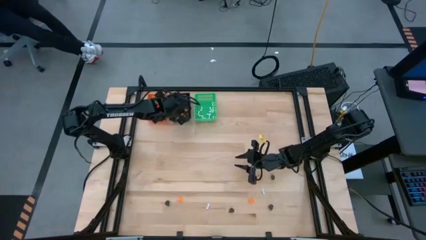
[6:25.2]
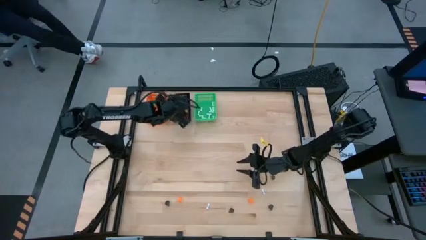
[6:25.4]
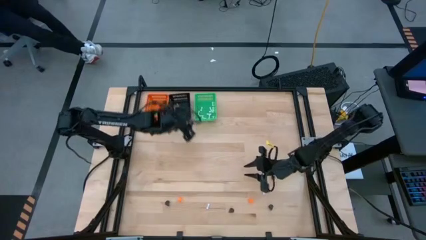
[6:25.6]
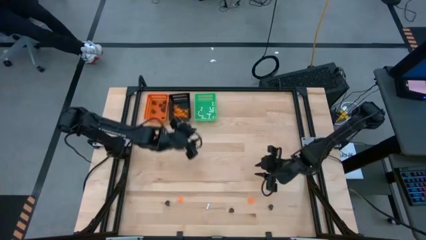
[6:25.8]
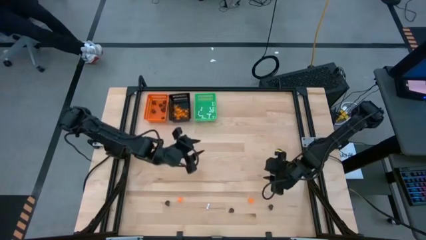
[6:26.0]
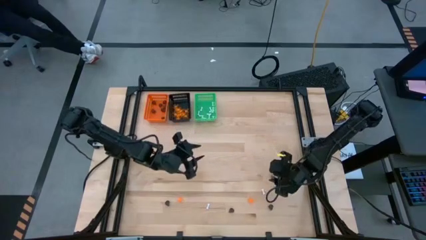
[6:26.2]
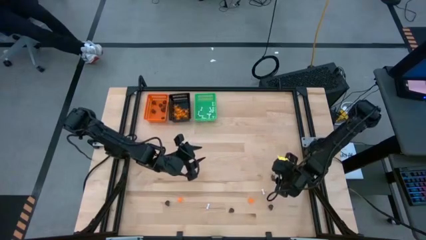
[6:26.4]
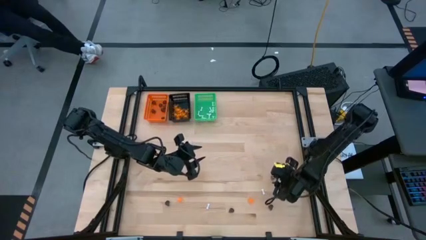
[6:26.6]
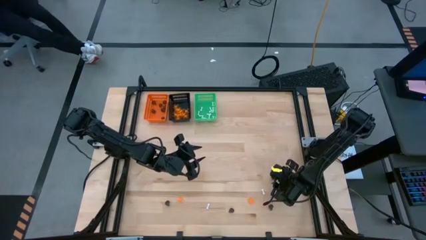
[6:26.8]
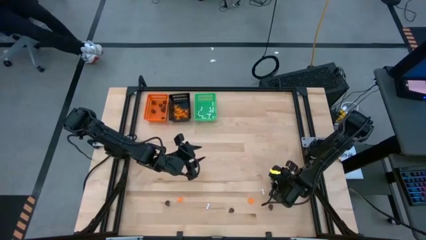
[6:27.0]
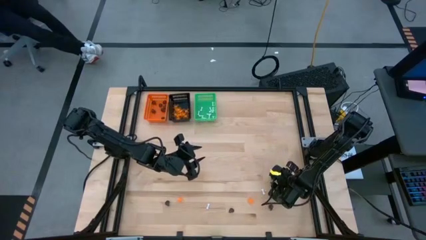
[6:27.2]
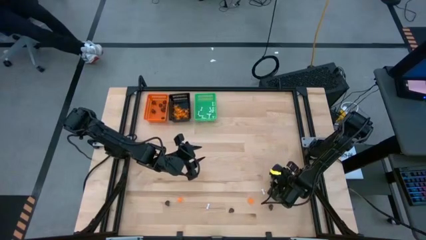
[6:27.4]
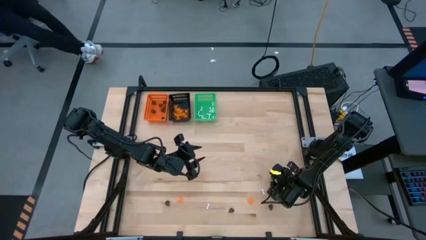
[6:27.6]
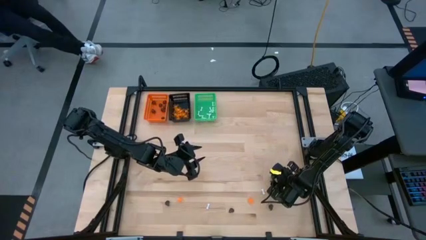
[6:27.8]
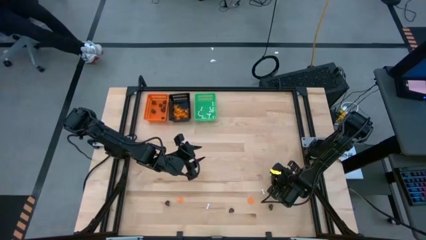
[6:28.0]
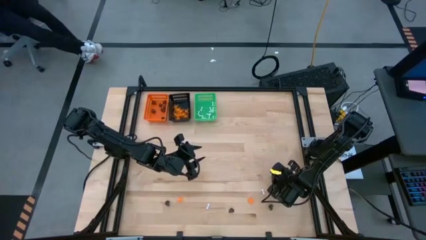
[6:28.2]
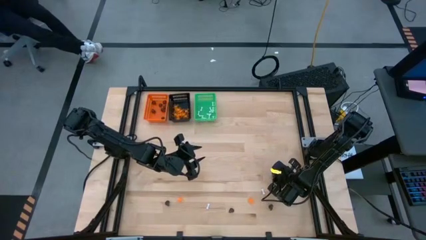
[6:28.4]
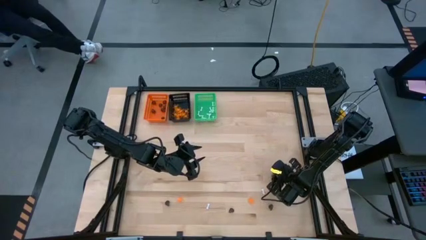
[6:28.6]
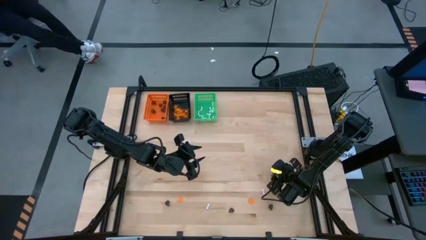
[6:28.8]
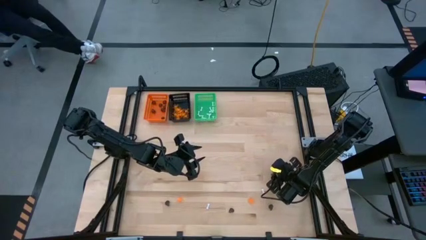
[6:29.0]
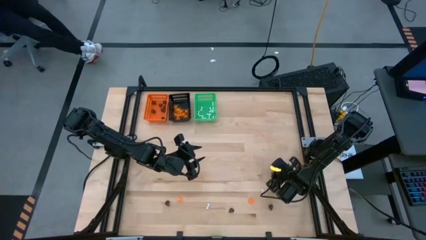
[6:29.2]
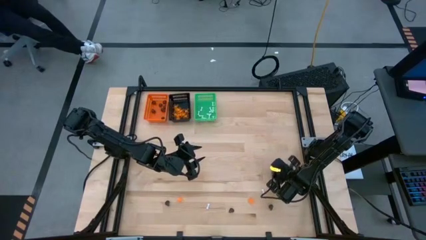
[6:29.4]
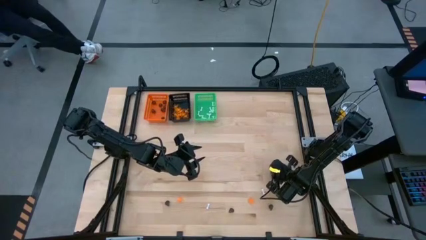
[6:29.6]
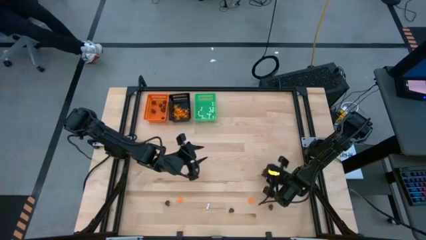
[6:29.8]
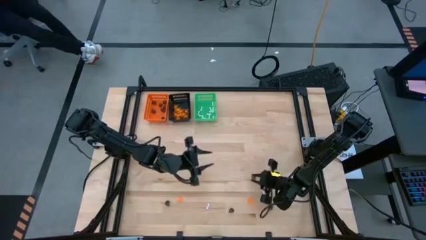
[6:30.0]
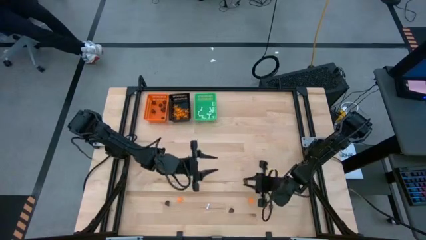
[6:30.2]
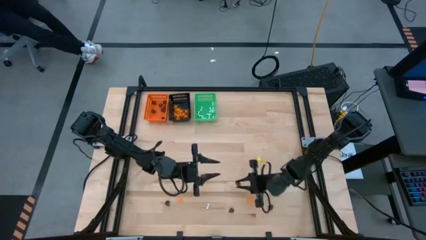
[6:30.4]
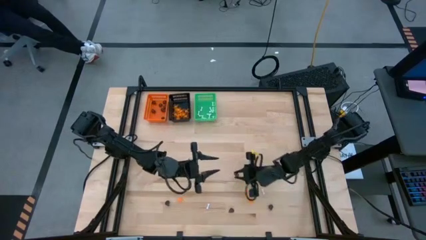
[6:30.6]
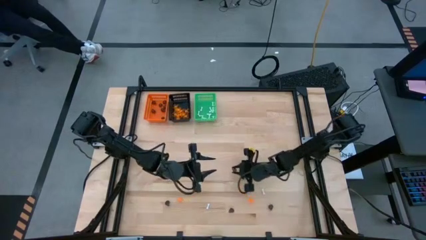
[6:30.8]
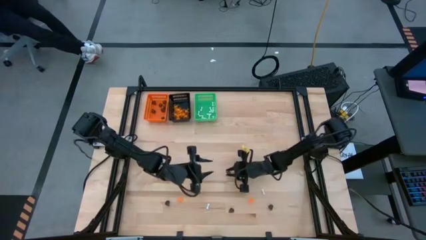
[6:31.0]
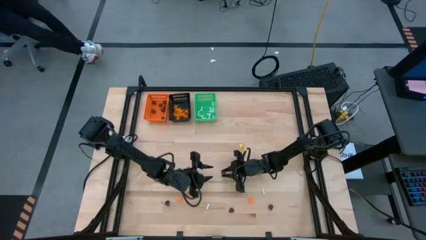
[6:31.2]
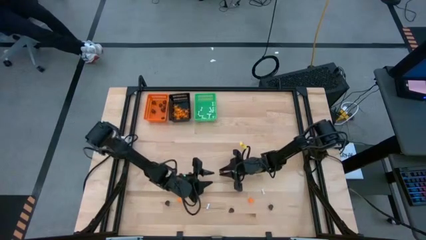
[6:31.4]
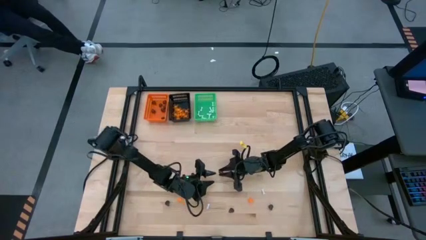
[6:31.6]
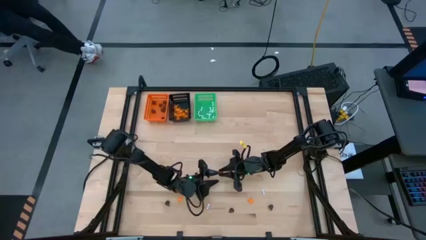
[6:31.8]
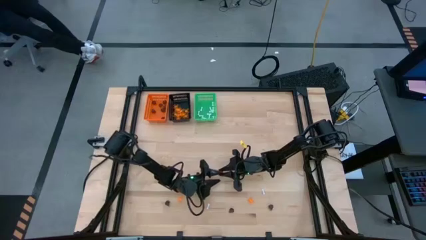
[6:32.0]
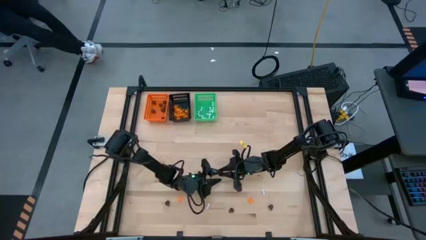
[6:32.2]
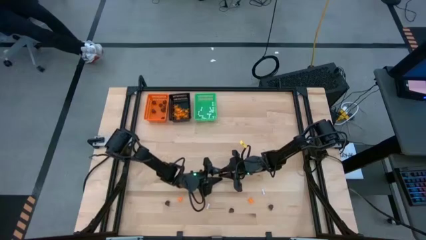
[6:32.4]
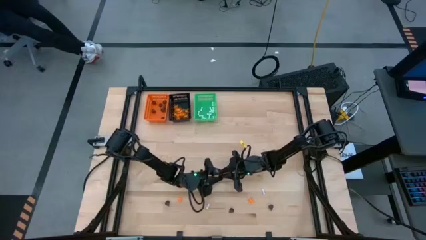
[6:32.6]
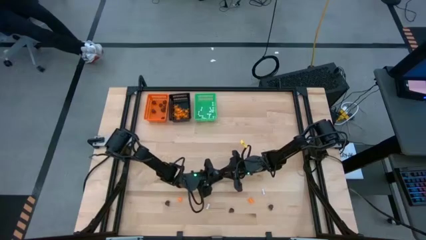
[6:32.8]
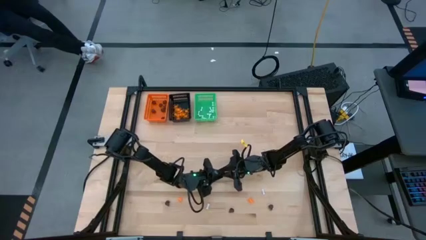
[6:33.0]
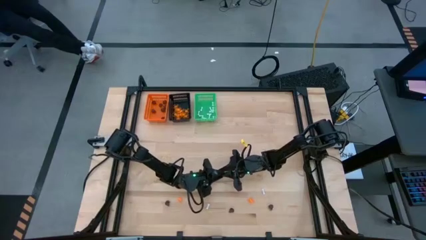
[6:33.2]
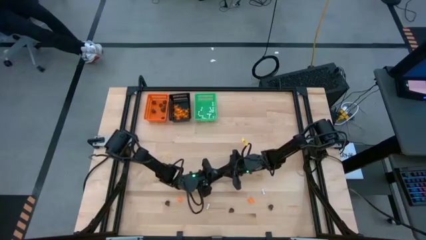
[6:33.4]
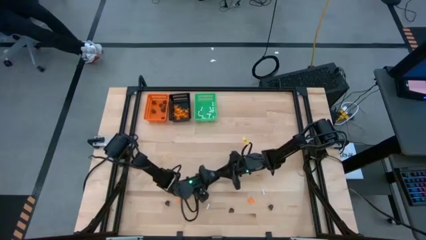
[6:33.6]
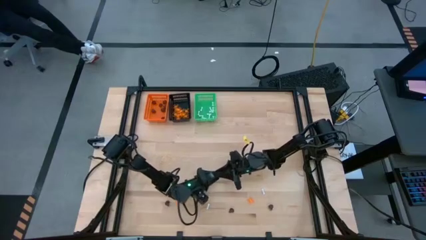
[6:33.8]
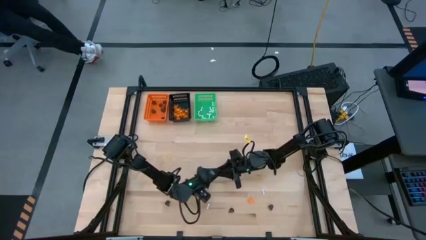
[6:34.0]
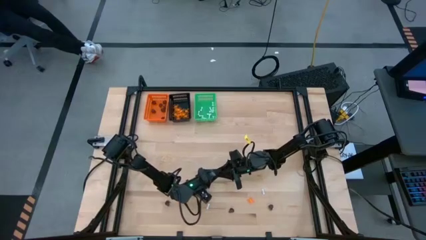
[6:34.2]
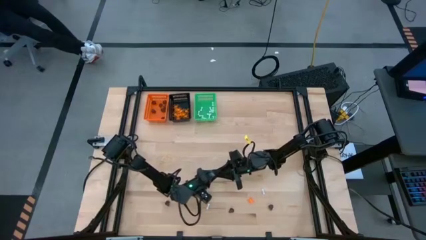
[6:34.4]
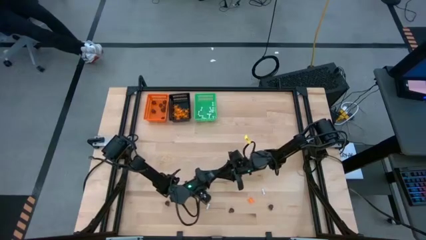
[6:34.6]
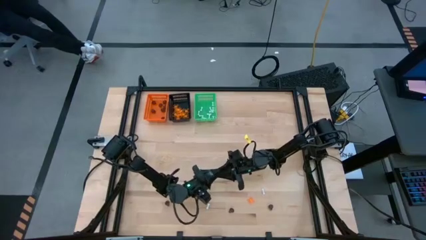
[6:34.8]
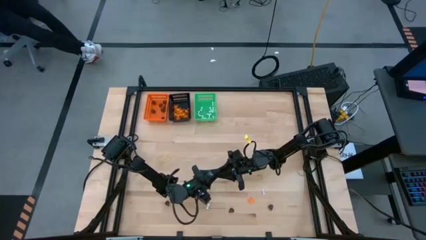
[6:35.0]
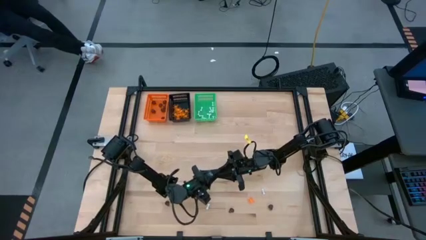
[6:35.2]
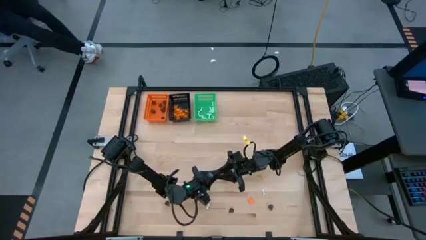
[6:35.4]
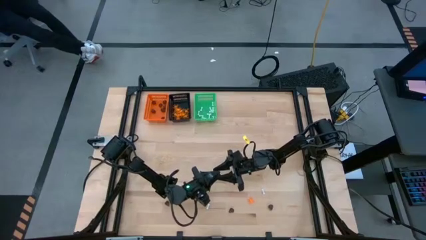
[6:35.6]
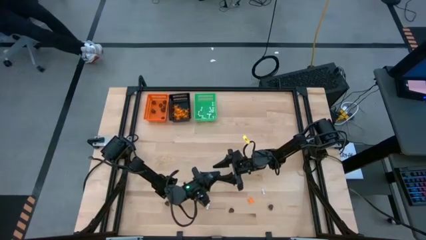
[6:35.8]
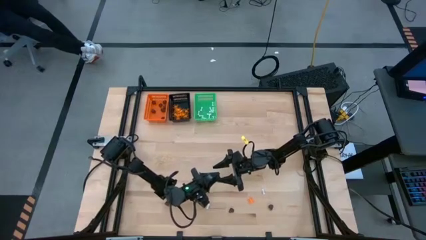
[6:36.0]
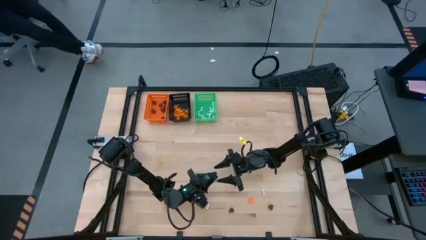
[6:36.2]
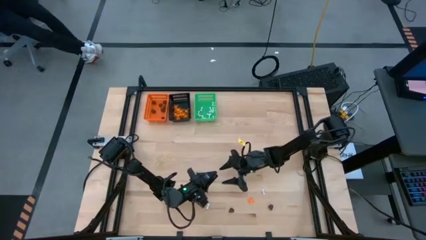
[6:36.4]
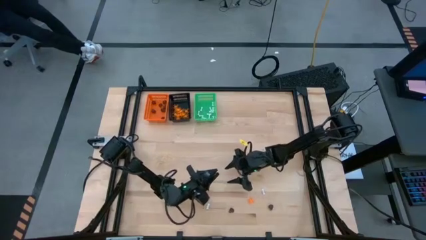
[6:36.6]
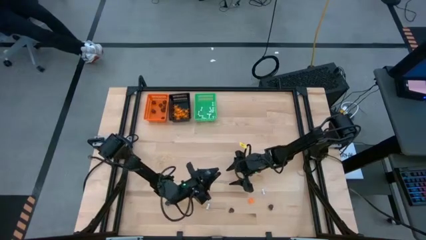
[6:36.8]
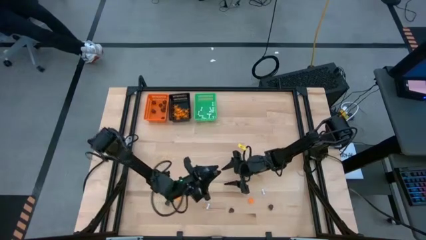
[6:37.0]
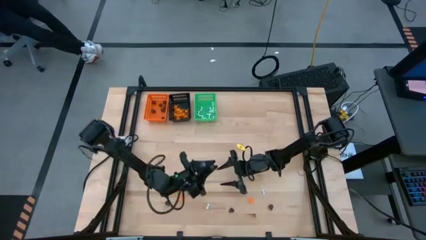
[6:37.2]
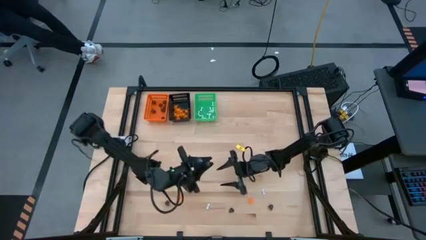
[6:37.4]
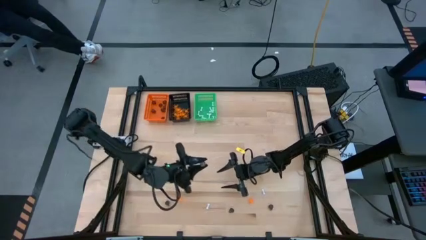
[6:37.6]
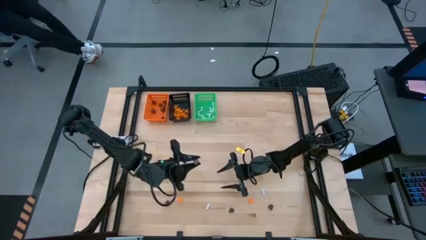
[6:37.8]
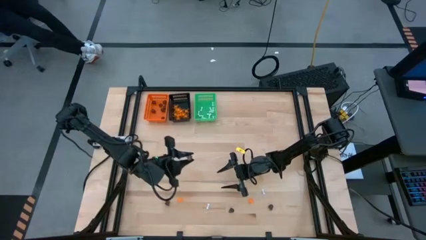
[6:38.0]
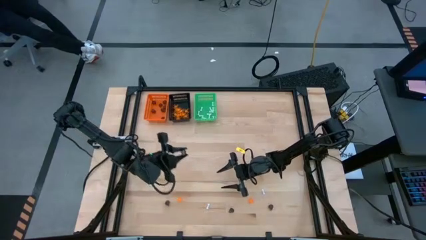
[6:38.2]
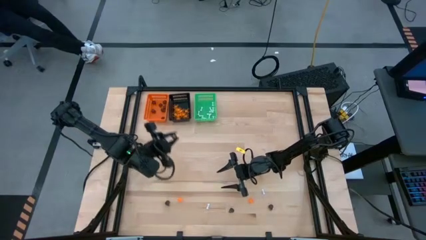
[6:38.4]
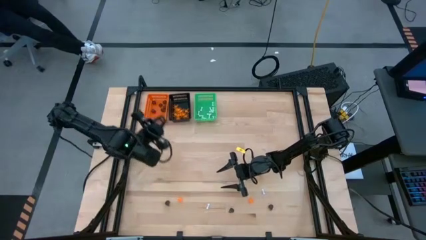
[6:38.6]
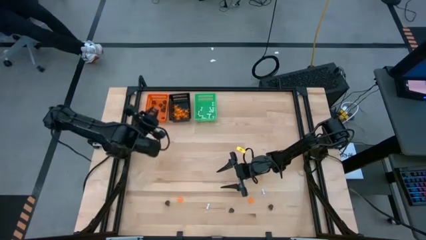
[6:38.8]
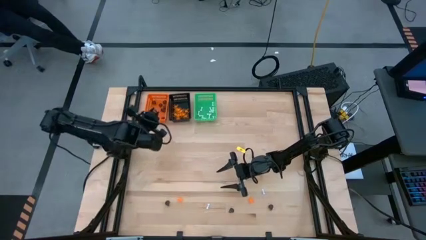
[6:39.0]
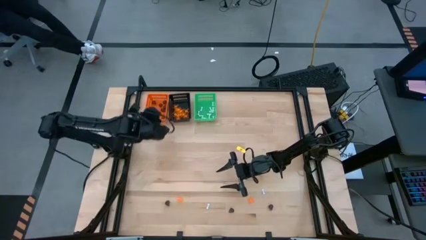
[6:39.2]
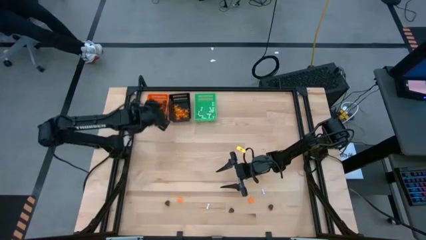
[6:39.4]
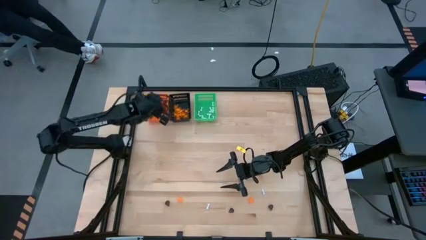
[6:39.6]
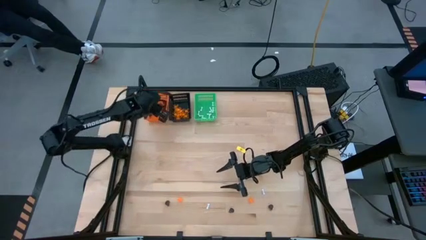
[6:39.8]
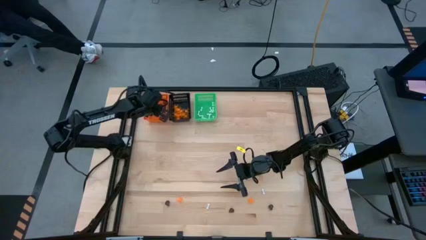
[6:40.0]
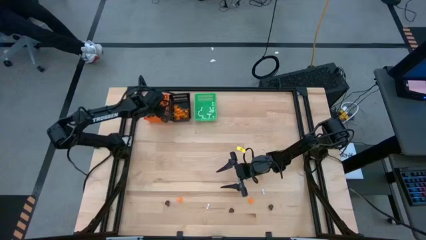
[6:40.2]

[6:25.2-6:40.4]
Task: Sort Halloween decoration
Put the black skull toy into the orange bin
